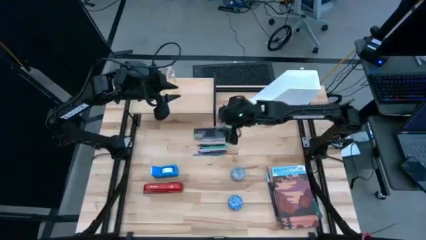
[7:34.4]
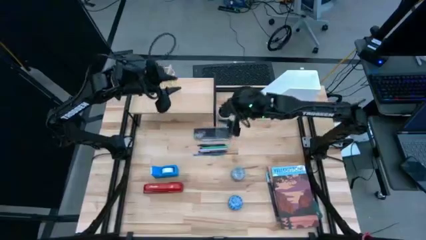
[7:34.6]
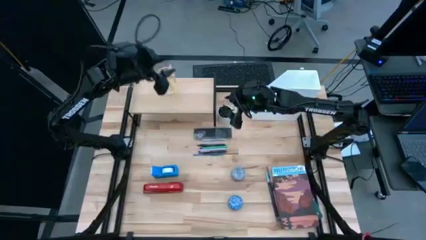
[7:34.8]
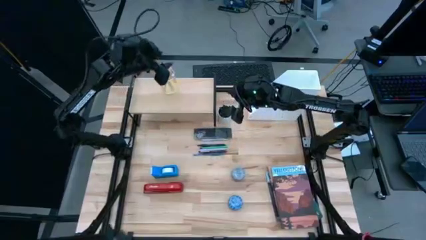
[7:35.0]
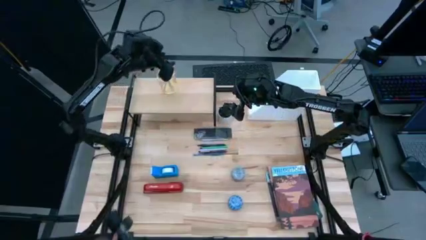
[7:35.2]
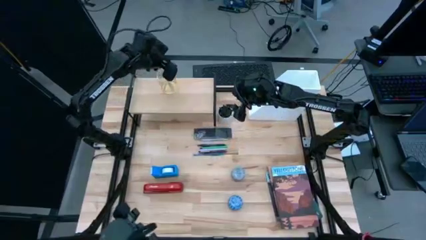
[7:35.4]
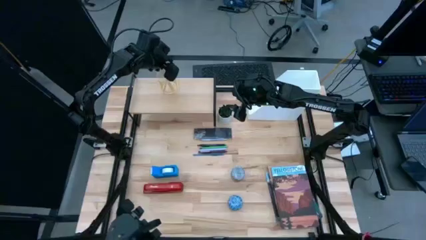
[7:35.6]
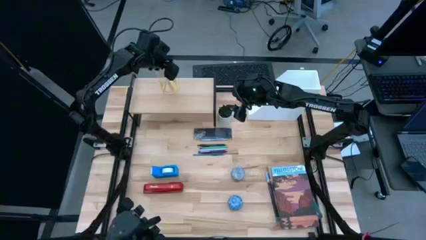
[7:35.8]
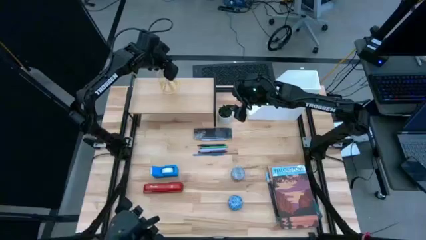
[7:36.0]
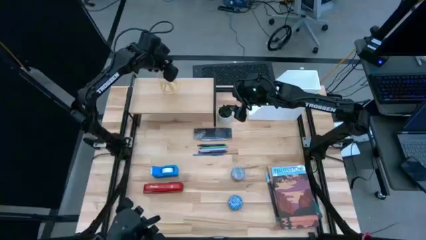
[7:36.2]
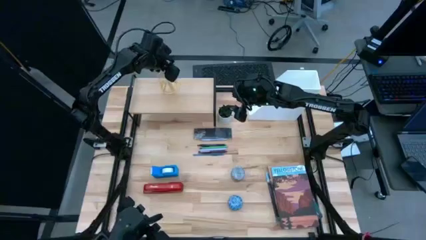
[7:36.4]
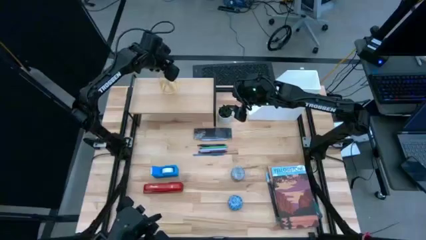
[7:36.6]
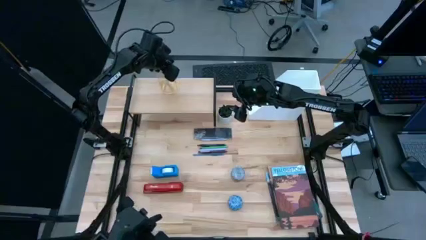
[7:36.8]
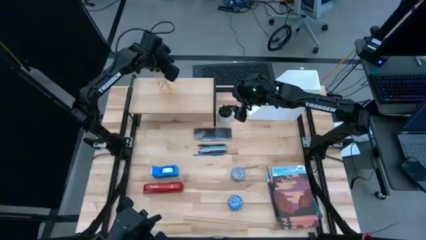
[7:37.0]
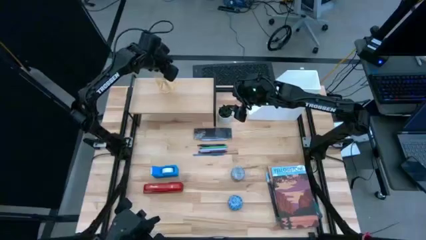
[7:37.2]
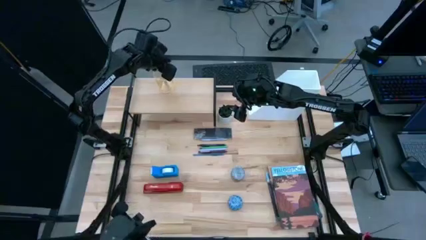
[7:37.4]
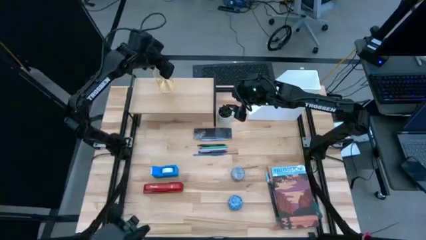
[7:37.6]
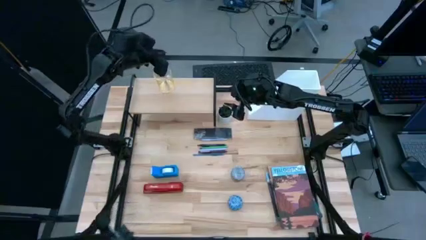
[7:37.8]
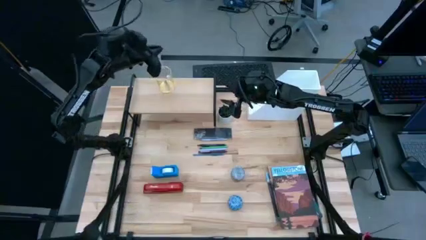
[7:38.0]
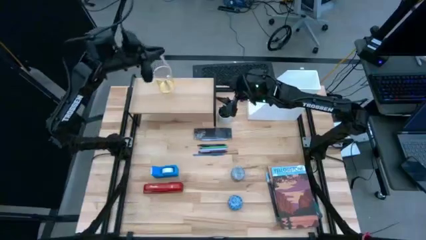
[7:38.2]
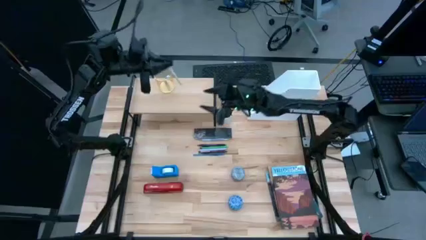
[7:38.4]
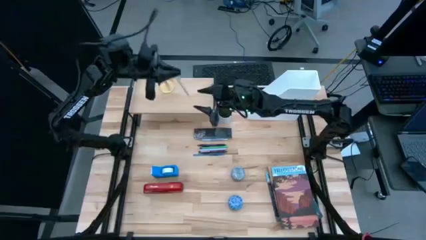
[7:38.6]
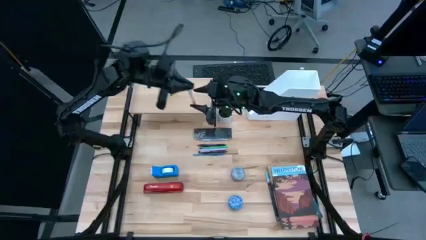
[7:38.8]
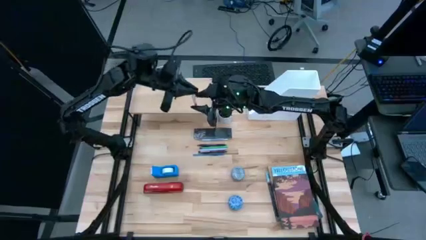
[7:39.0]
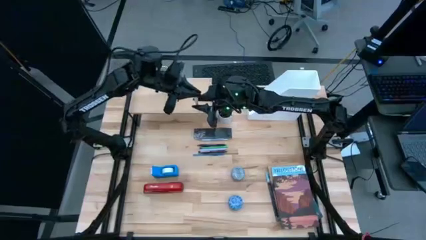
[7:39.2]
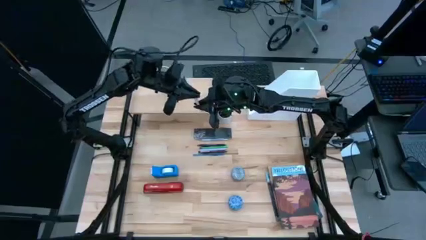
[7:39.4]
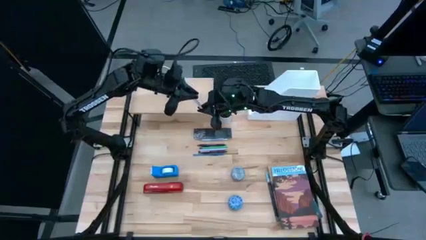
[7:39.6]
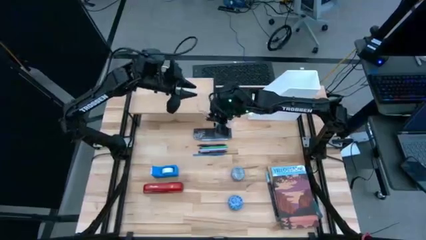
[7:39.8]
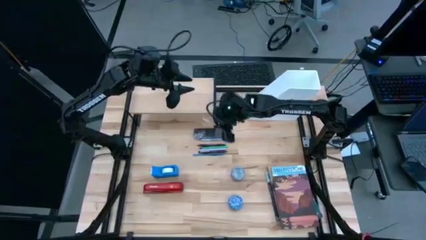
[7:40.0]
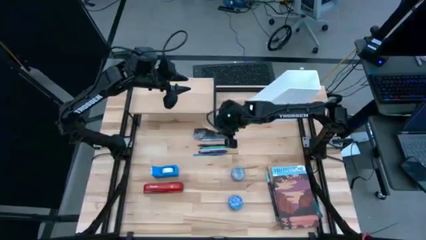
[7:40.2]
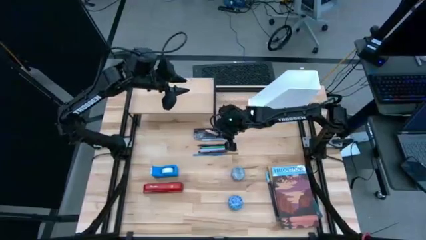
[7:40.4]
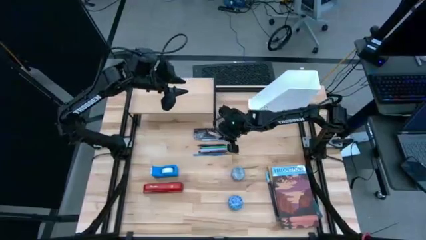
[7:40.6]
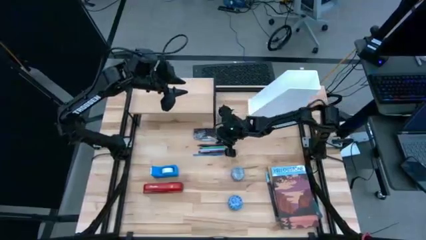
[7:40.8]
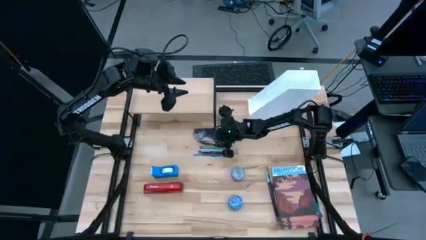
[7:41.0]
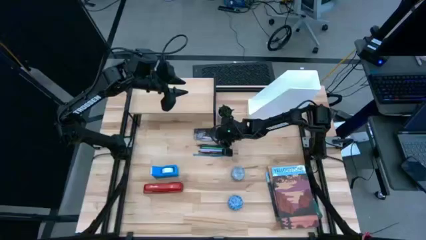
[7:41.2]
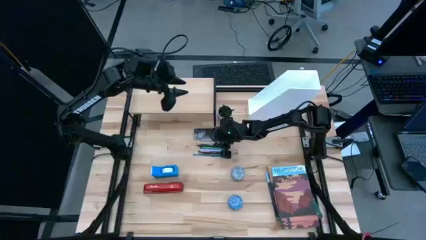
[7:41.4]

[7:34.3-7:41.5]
Task: Stock shelves
Remove the pink pen from the gold pen holder

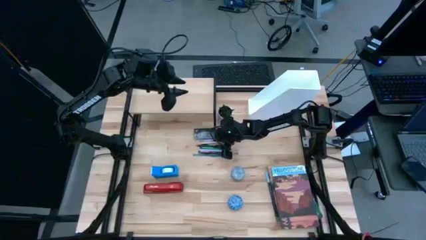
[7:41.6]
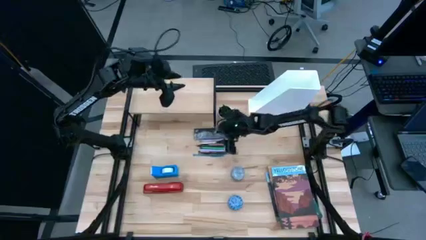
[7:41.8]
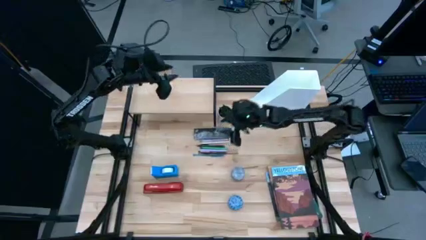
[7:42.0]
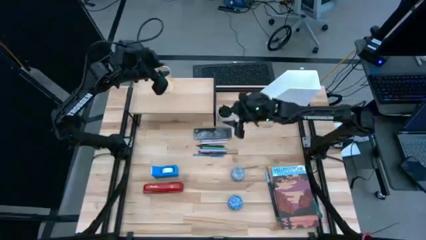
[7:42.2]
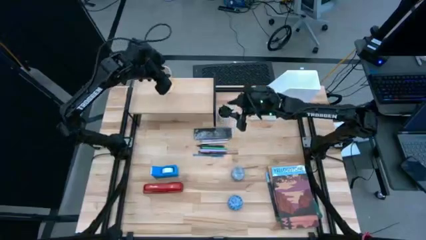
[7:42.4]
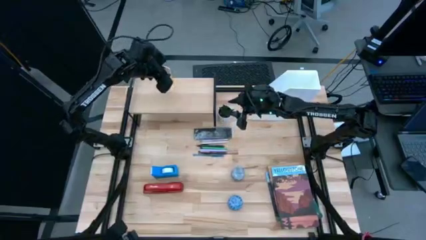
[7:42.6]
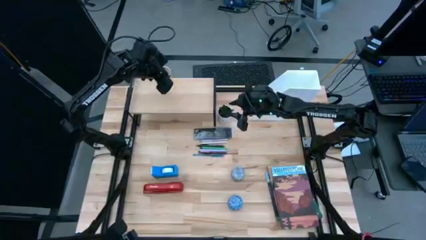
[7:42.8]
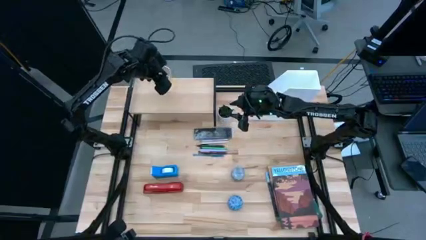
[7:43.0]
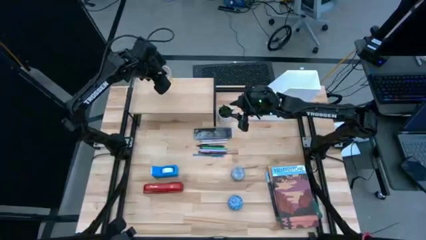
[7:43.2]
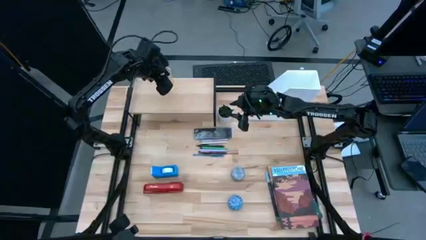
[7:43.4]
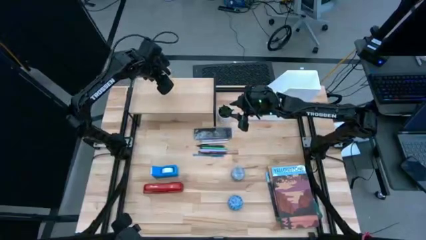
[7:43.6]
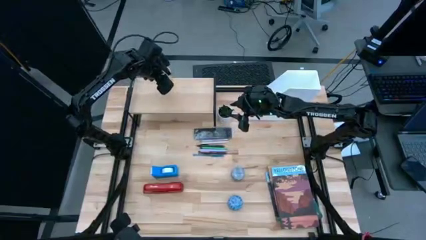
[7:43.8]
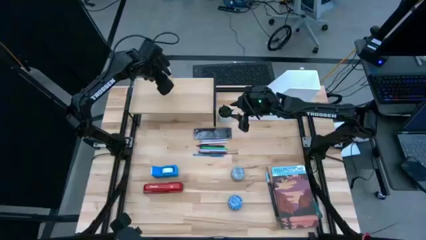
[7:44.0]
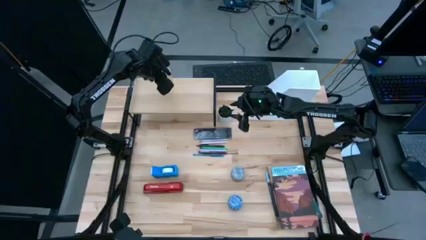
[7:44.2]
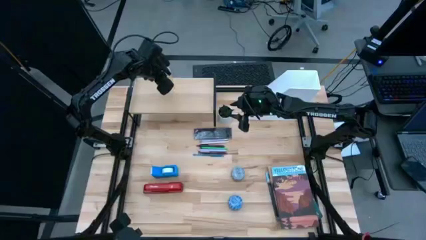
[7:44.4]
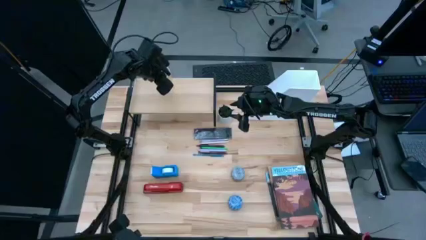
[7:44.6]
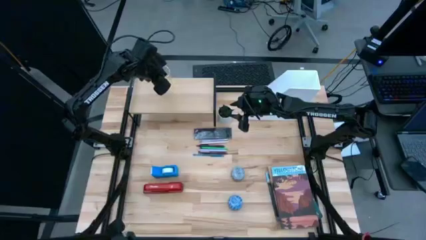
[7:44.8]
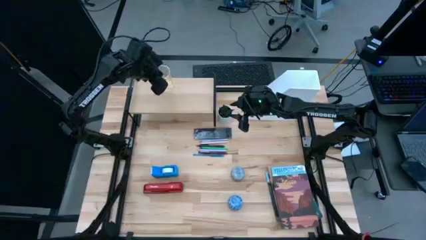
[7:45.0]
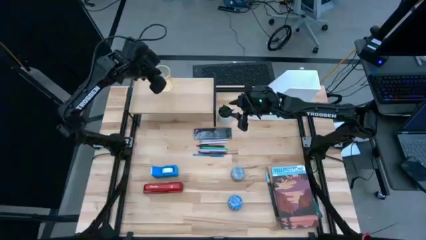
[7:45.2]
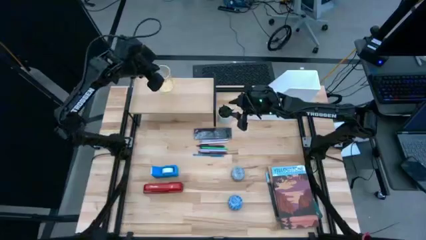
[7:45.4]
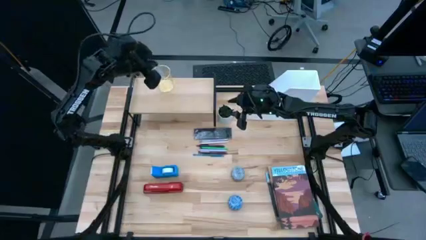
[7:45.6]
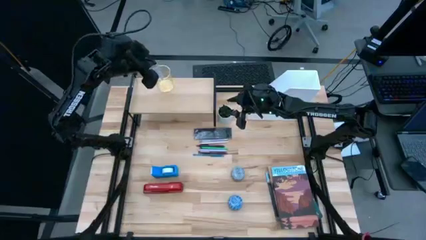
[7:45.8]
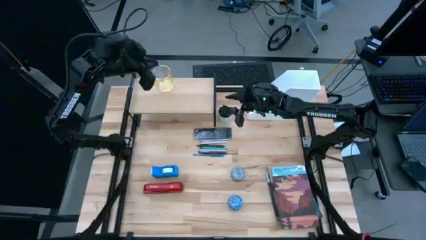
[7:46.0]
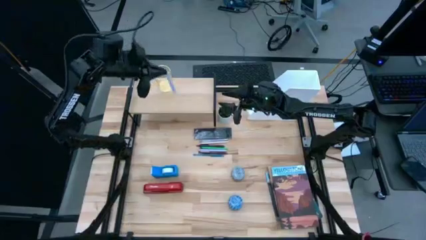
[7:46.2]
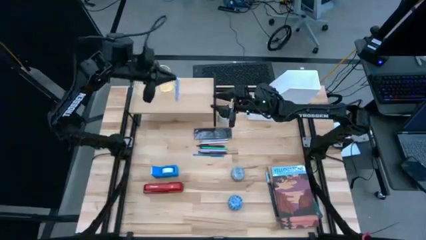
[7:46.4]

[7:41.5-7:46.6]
Remove the blue pen from the gold pen holder

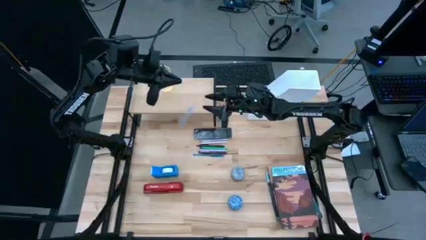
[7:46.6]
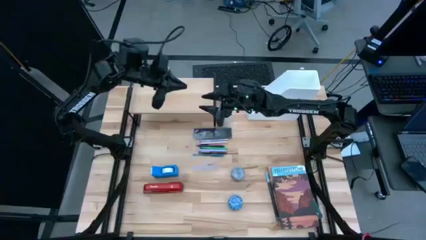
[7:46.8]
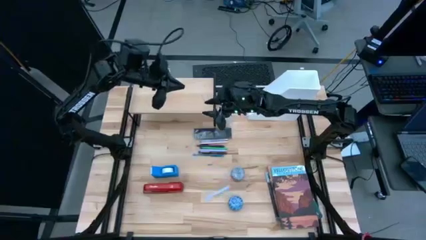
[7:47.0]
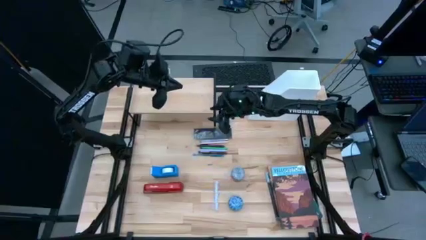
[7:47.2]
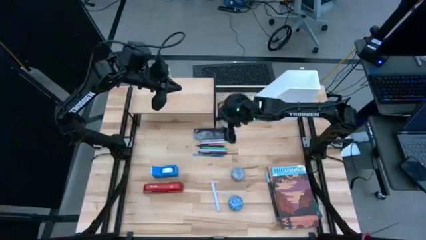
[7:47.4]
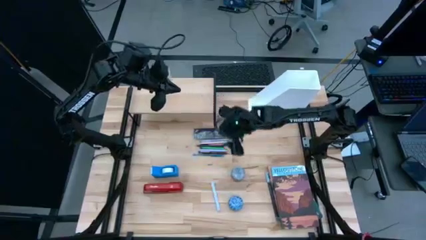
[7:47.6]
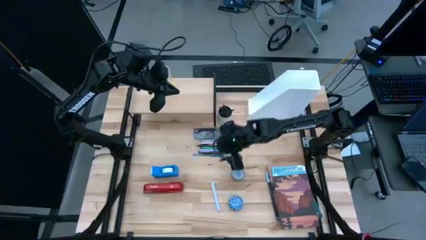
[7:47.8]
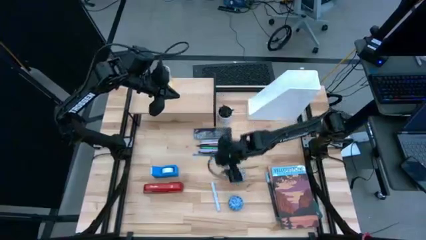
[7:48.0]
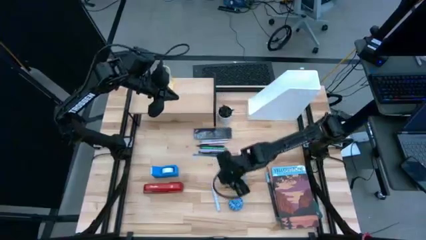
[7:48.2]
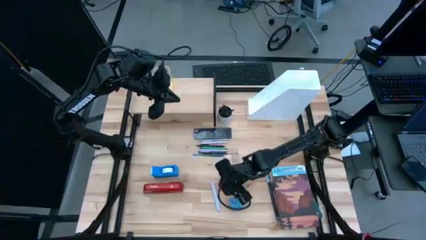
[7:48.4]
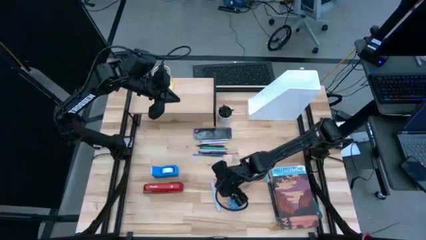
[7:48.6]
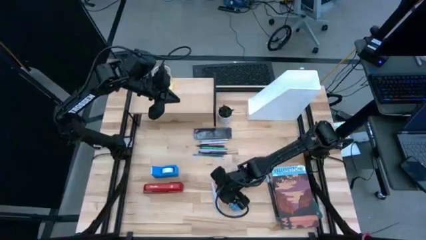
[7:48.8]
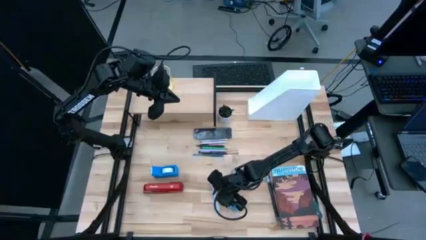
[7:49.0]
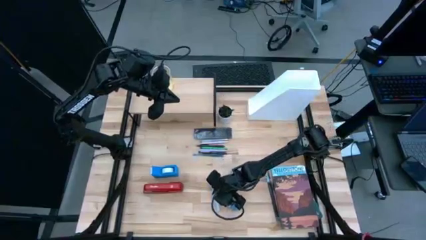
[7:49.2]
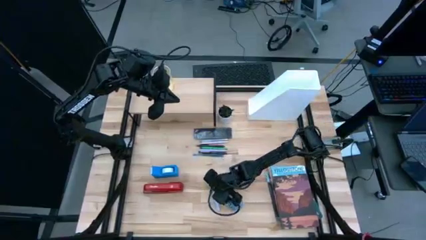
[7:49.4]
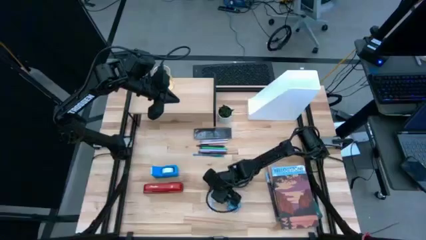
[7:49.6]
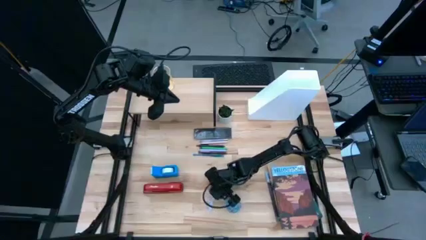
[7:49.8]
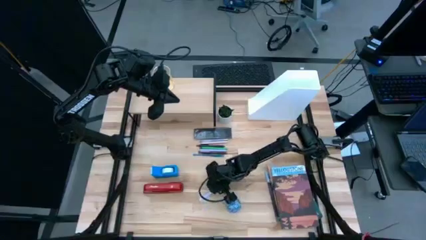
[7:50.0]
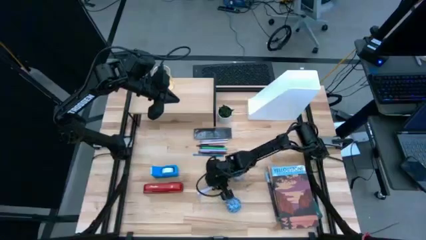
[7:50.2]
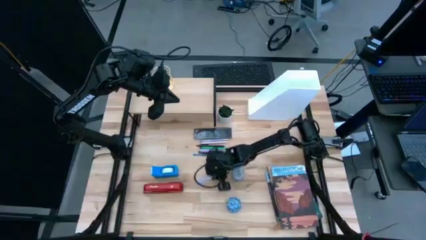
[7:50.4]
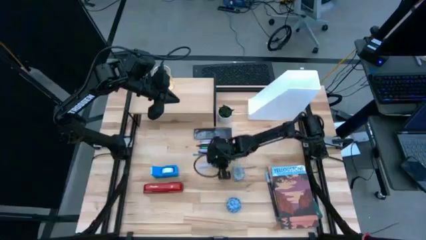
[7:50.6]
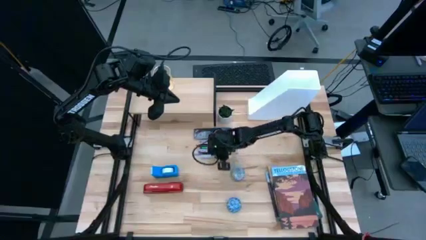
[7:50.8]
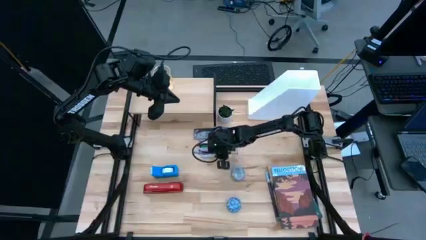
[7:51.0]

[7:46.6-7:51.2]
Remove the blue pen from the gold pen holder
